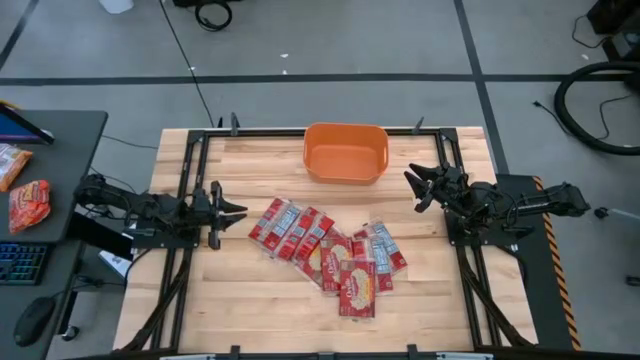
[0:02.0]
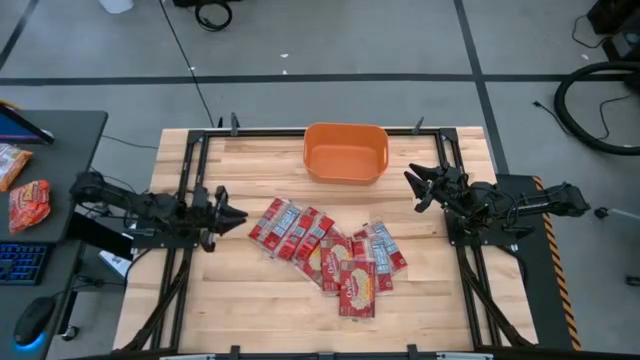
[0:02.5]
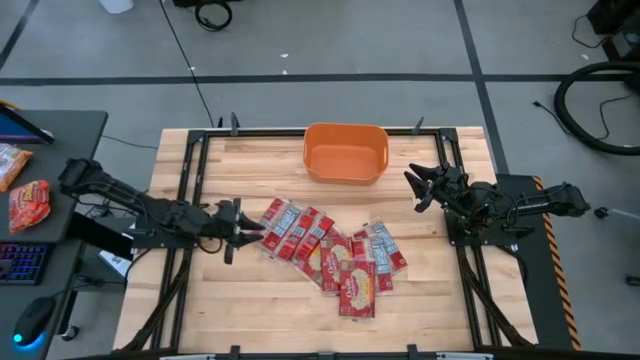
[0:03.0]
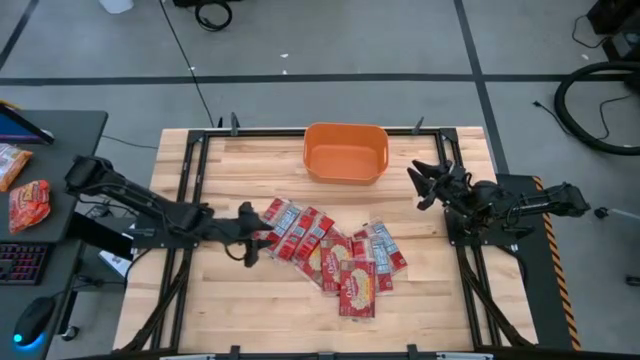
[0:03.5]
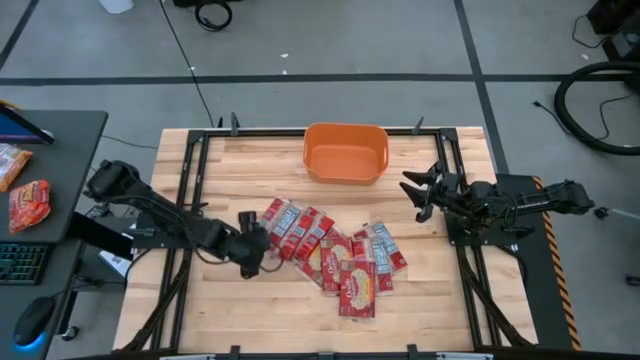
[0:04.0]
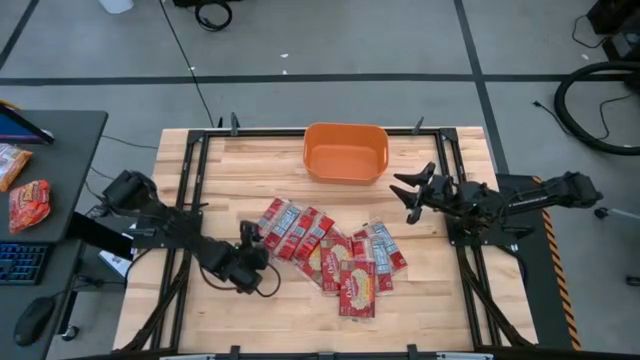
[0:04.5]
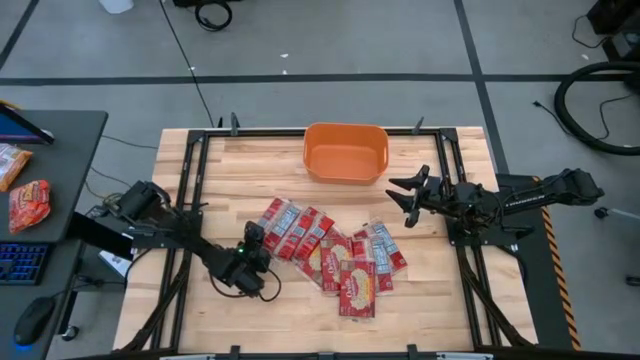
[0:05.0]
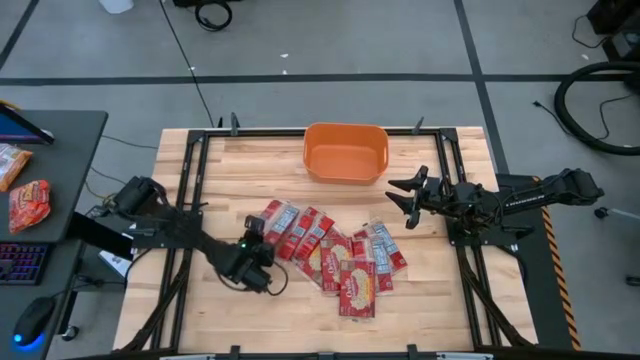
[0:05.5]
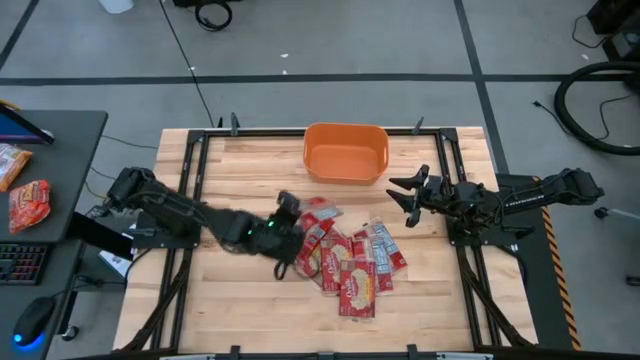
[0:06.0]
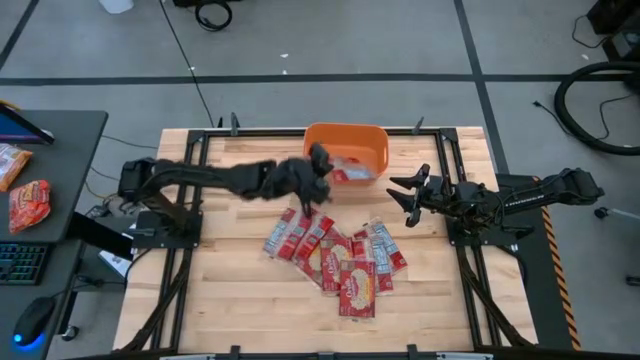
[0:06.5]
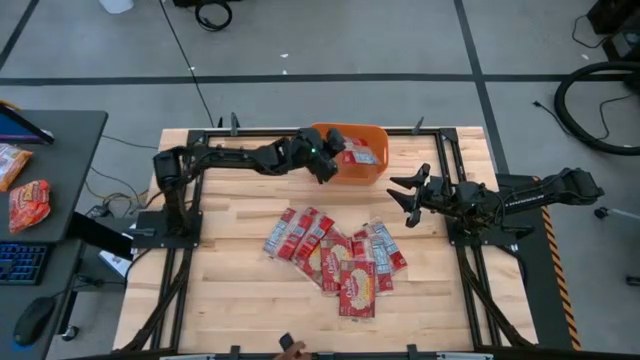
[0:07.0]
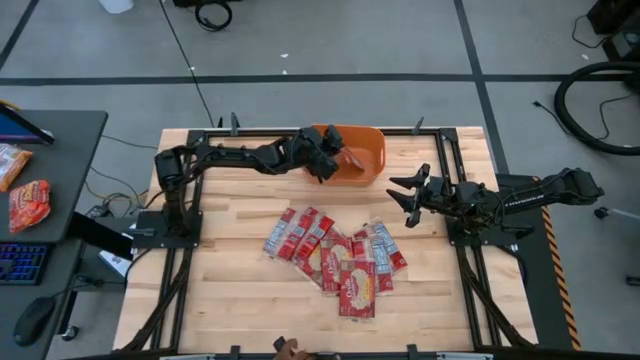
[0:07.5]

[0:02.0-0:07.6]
Task: Sort popcorn bags into baskets
Put the red popcorn bag into the orange bin

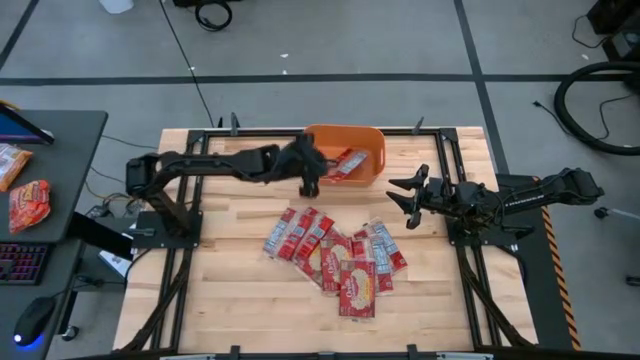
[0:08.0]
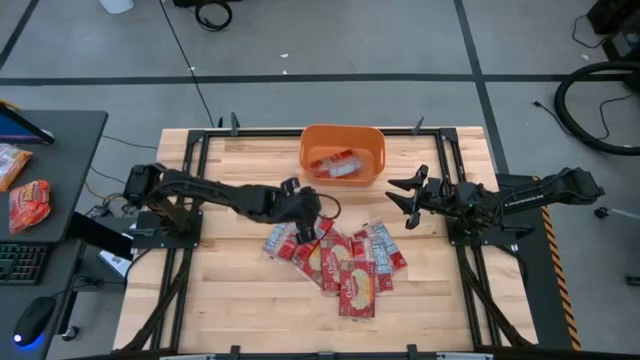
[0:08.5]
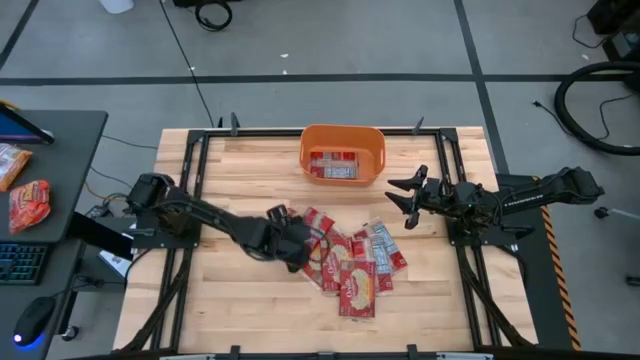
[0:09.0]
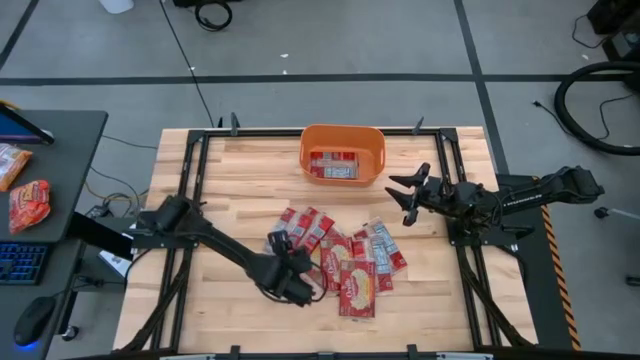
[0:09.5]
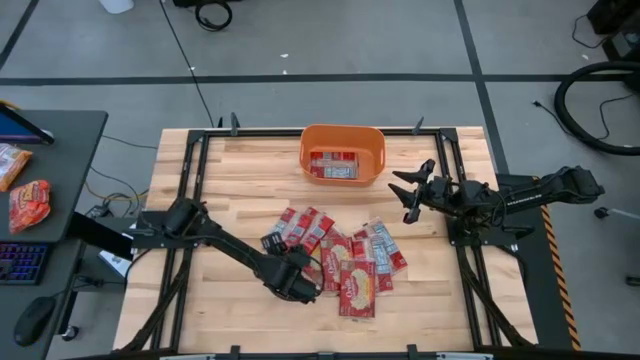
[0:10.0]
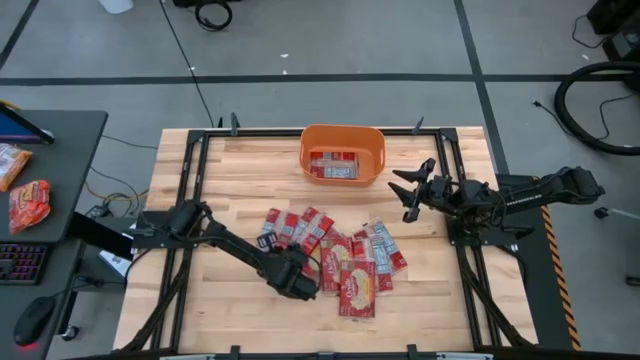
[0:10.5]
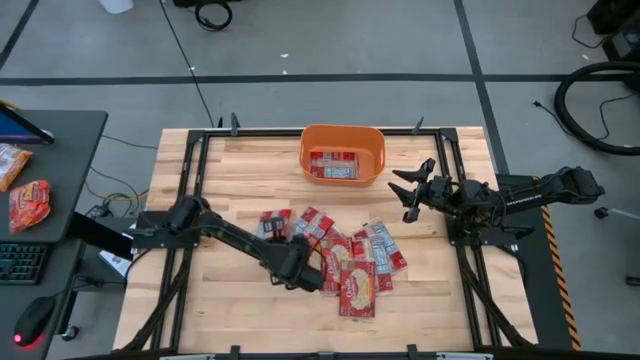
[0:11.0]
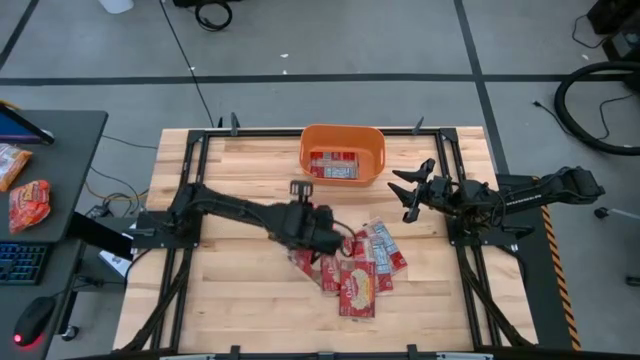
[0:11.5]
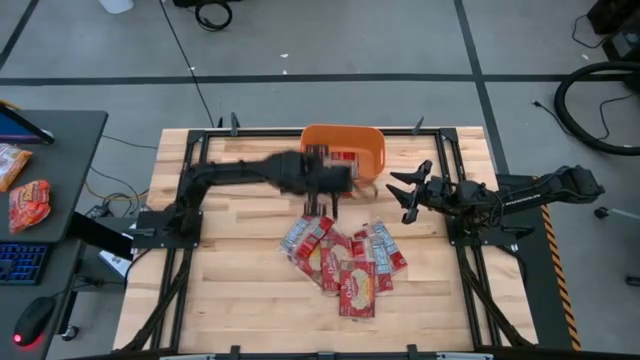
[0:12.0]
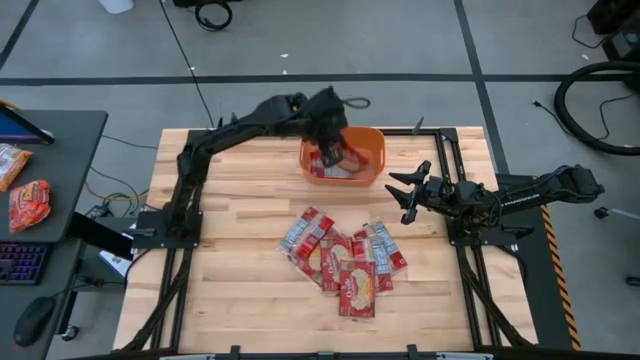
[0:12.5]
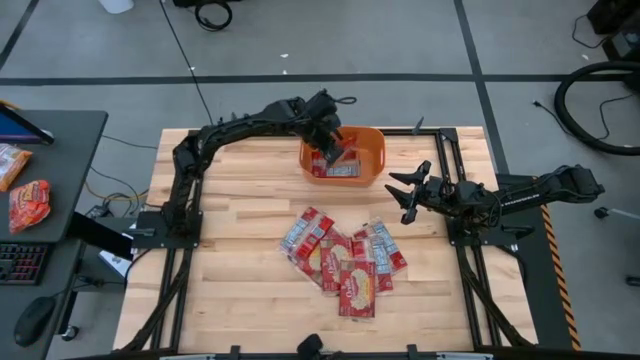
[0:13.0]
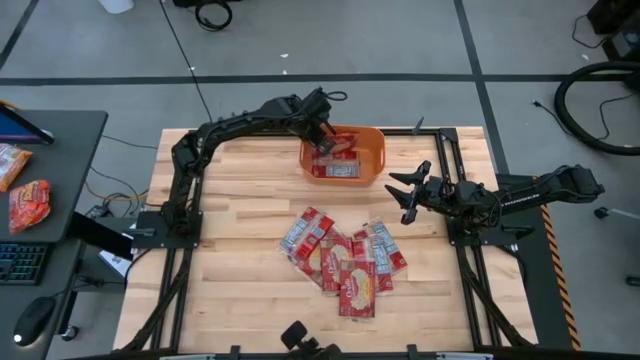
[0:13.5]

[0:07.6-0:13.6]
Put the red popcorn bag into the orange bin

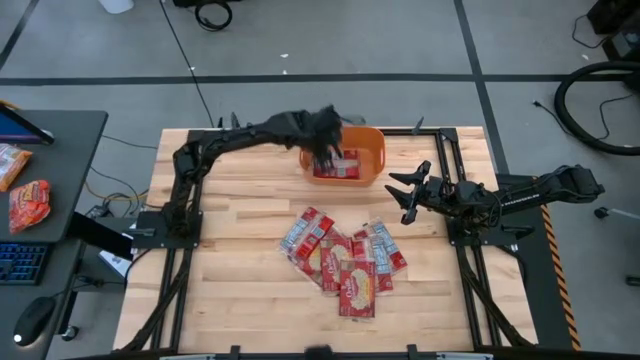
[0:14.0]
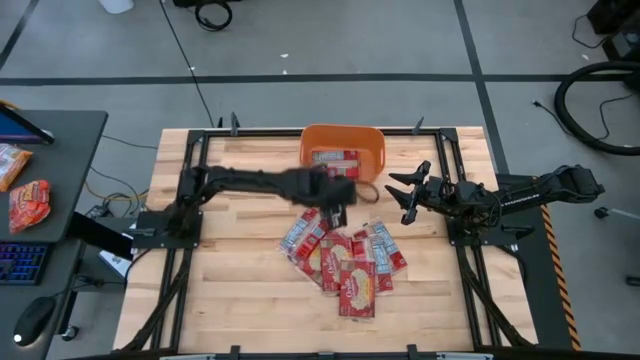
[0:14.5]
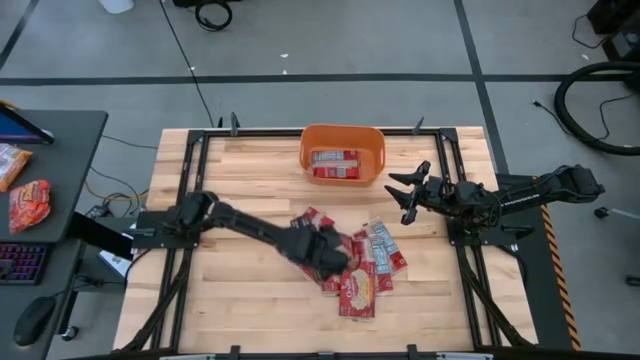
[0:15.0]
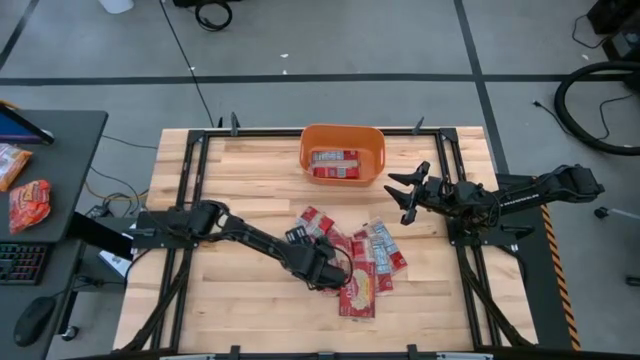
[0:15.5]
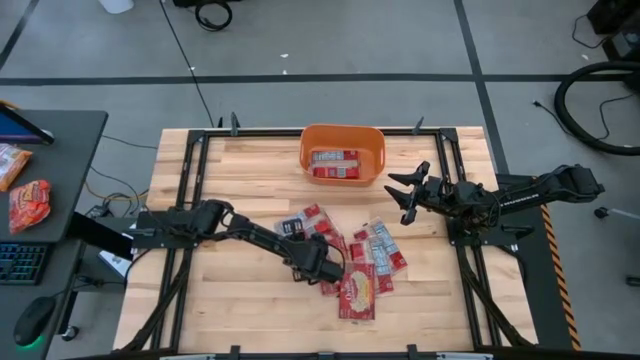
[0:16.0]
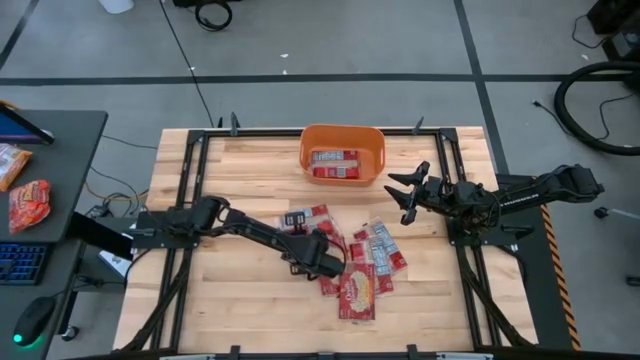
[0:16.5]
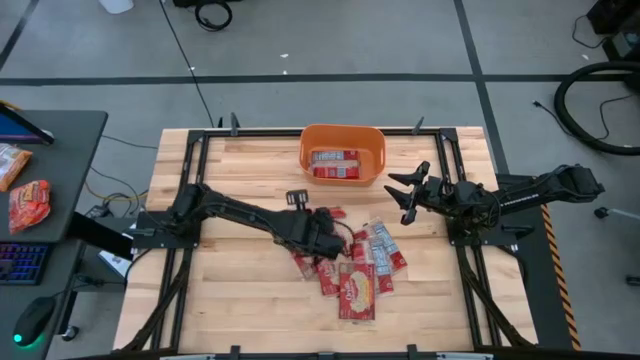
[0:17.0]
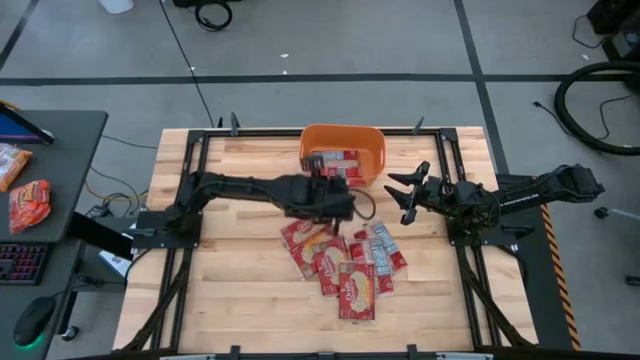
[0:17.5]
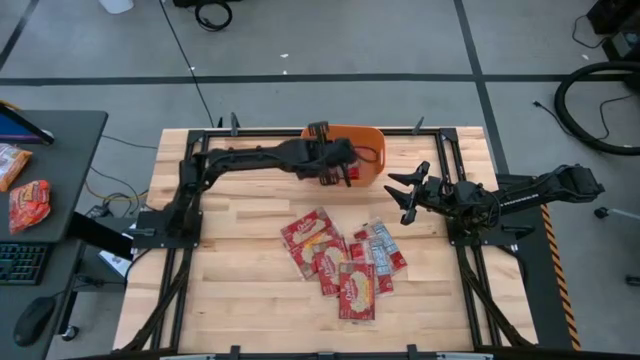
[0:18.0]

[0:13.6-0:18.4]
Put the red popcorn bag into the orange bin

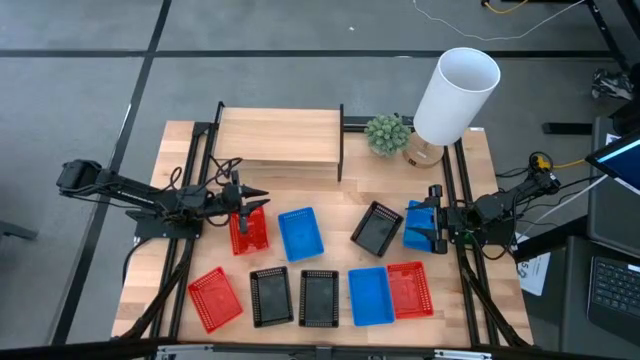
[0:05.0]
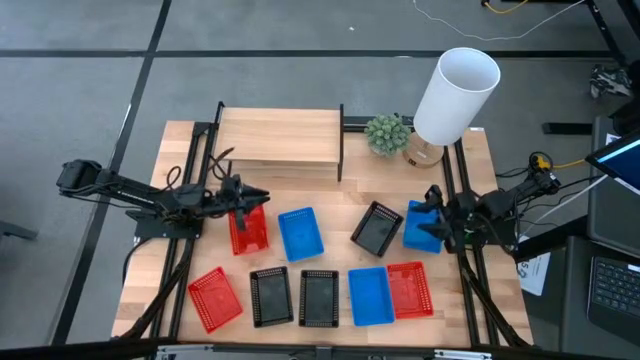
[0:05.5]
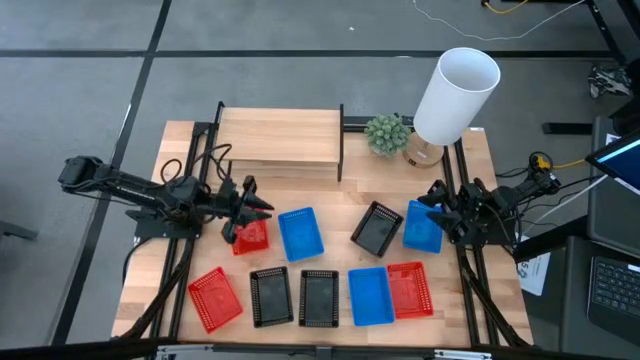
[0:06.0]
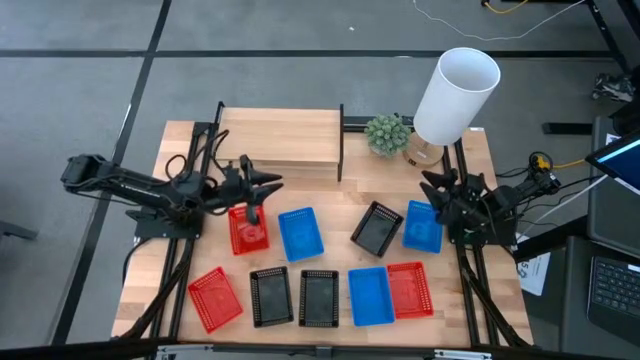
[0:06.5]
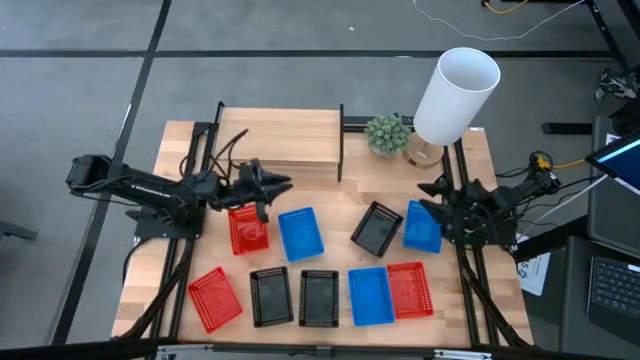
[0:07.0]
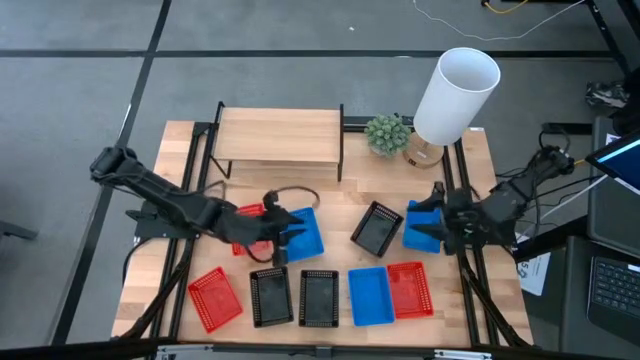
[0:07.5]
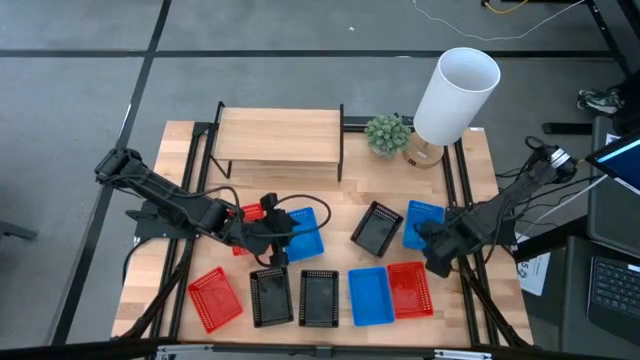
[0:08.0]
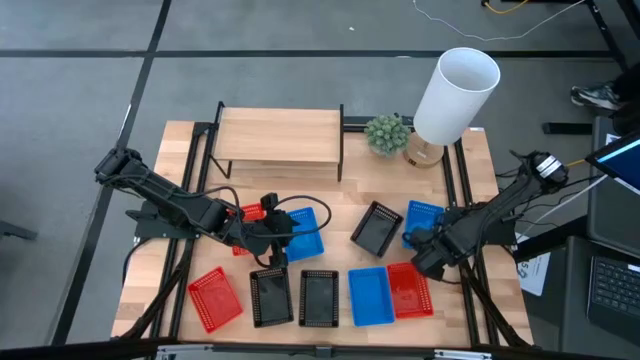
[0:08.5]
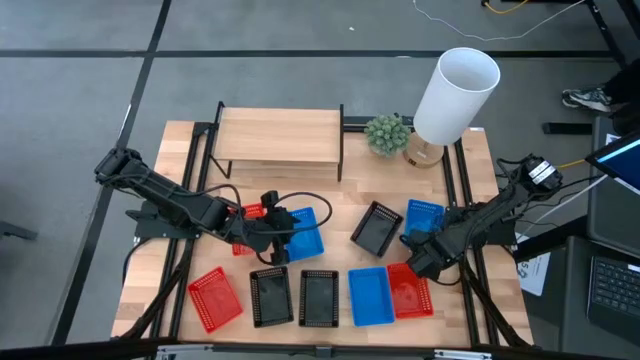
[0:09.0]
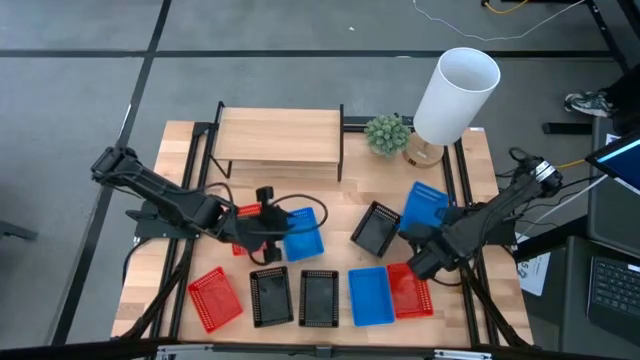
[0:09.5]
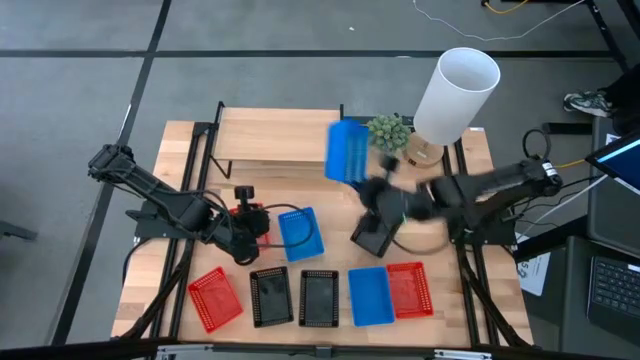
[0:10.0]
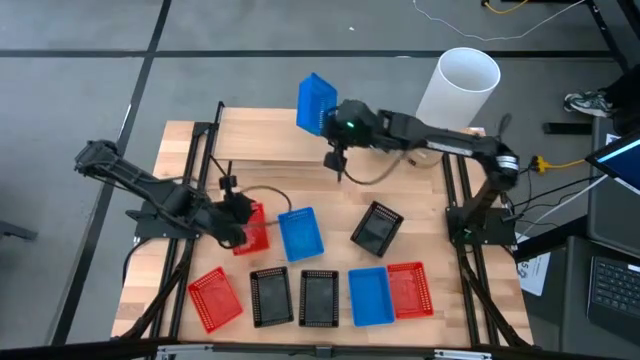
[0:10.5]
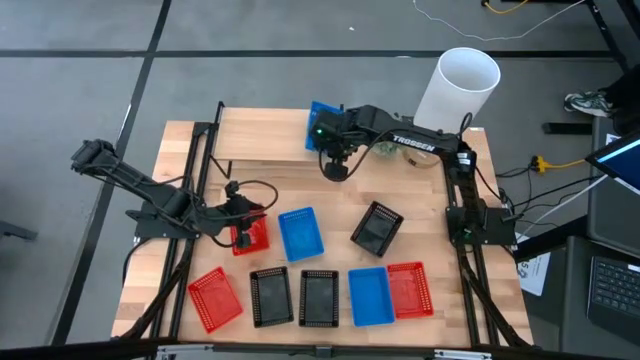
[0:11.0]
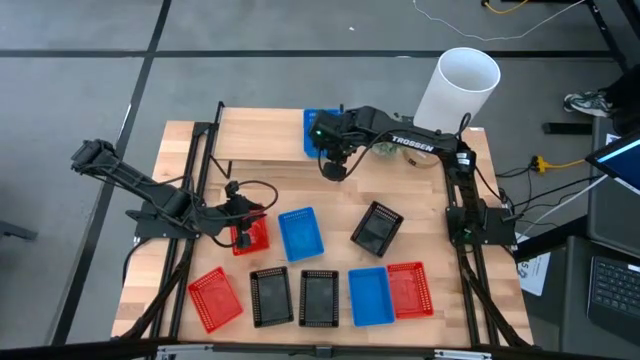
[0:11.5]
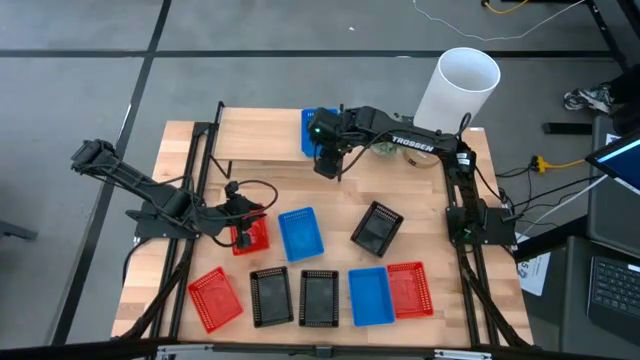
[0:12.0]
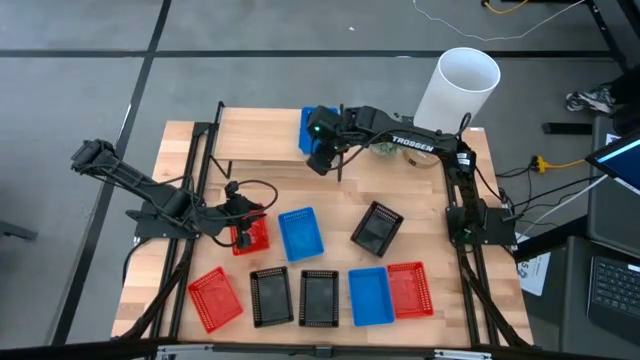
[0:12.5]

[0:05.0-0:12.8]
Task: Stack baskets on shelf by color
Put the right blue bin on the shelf
